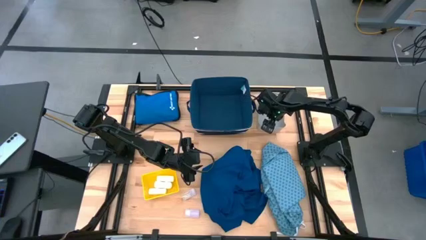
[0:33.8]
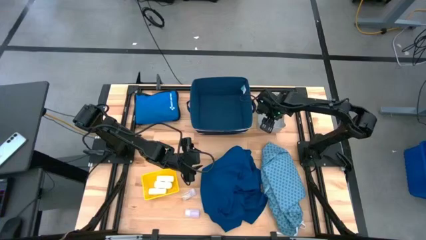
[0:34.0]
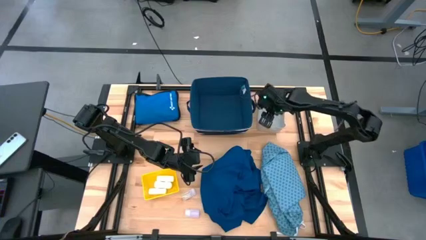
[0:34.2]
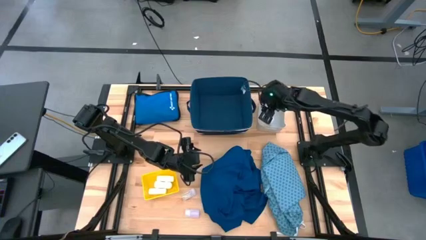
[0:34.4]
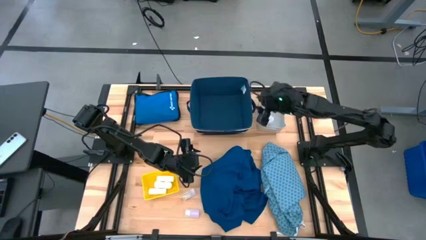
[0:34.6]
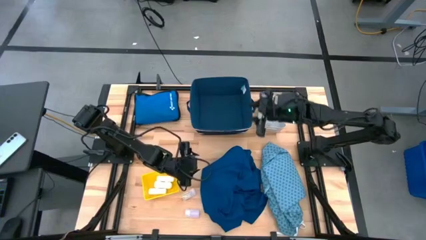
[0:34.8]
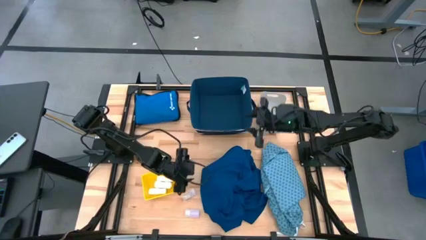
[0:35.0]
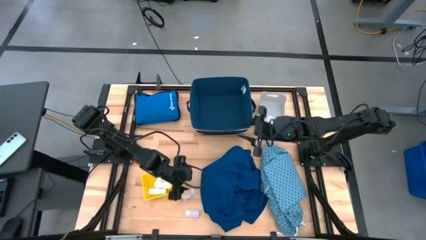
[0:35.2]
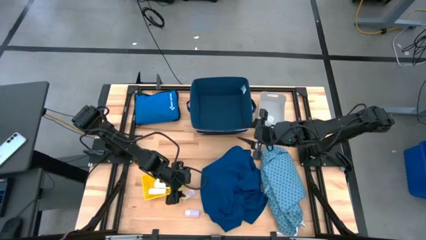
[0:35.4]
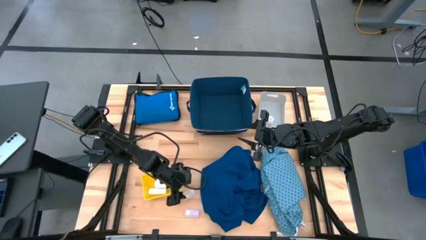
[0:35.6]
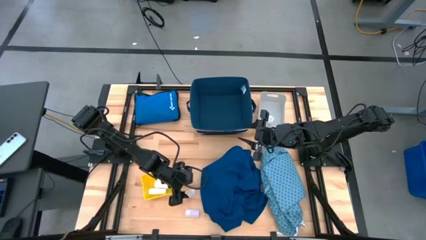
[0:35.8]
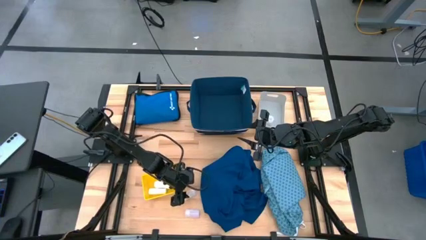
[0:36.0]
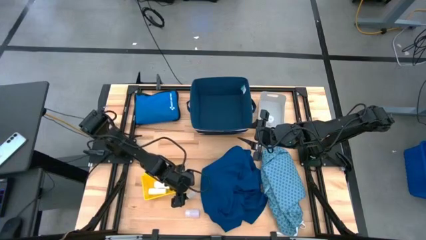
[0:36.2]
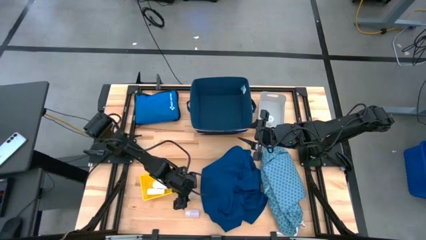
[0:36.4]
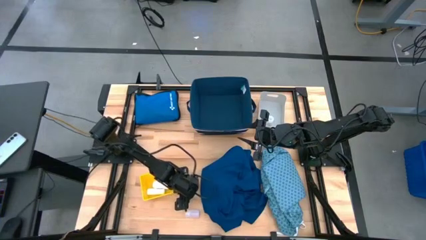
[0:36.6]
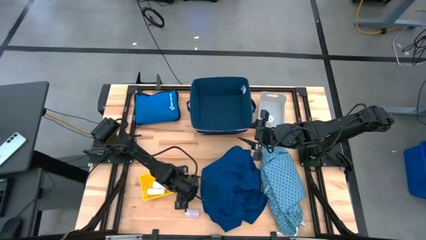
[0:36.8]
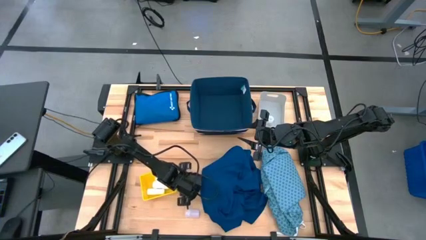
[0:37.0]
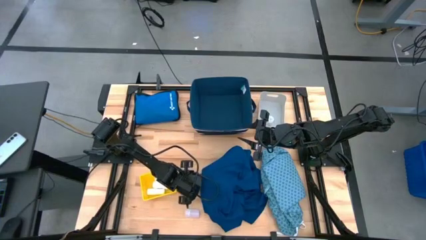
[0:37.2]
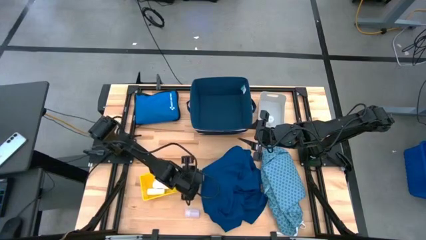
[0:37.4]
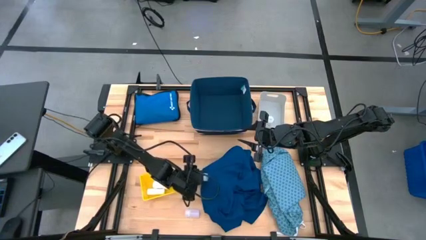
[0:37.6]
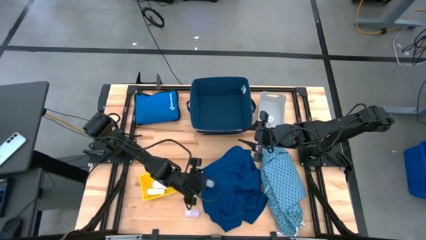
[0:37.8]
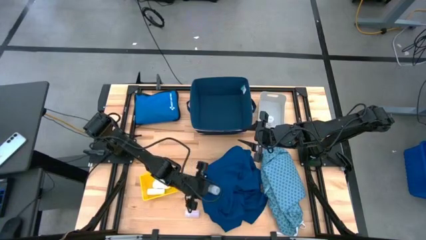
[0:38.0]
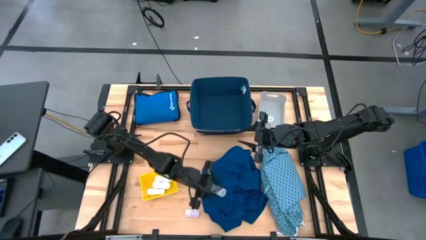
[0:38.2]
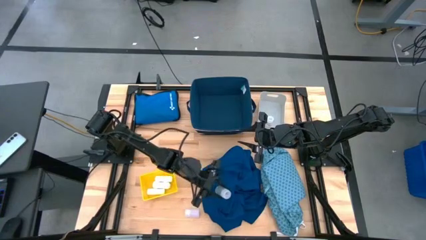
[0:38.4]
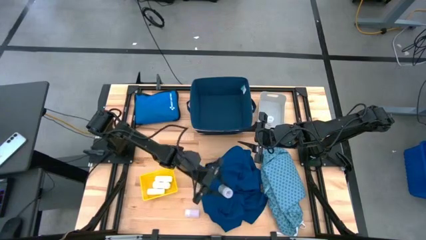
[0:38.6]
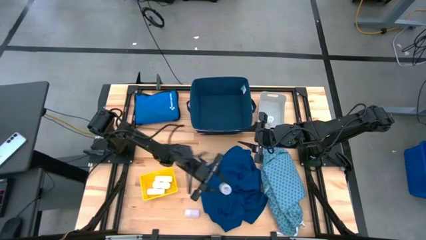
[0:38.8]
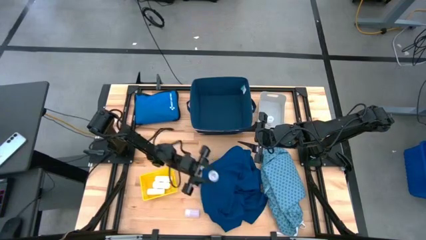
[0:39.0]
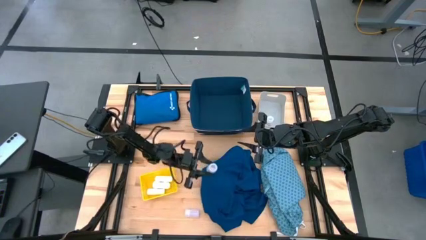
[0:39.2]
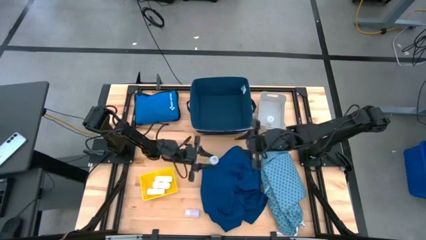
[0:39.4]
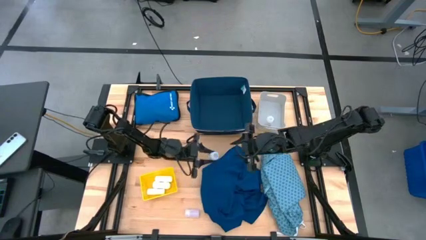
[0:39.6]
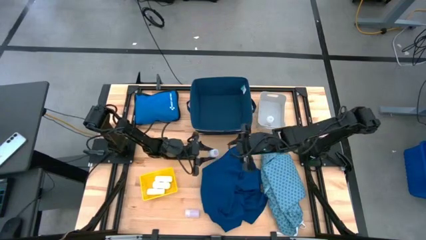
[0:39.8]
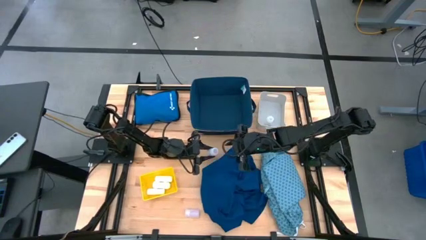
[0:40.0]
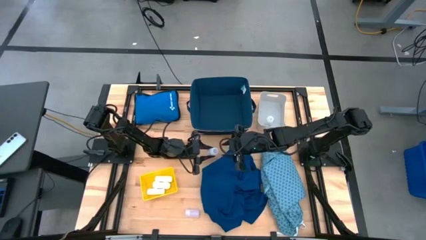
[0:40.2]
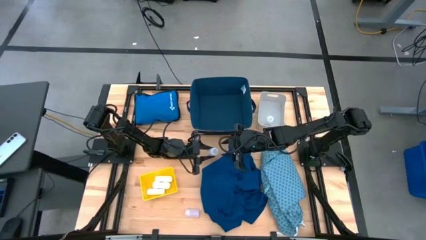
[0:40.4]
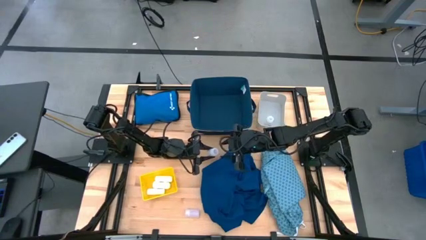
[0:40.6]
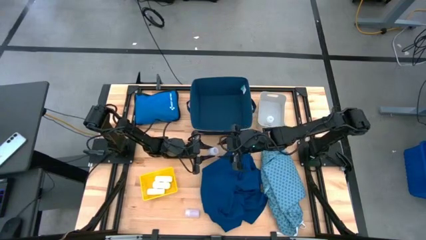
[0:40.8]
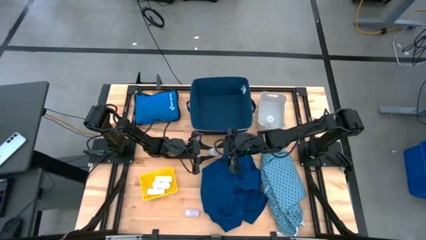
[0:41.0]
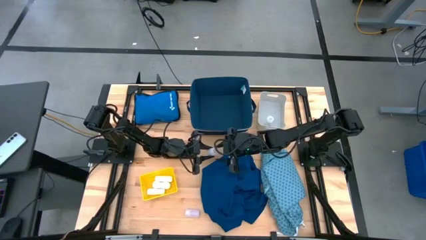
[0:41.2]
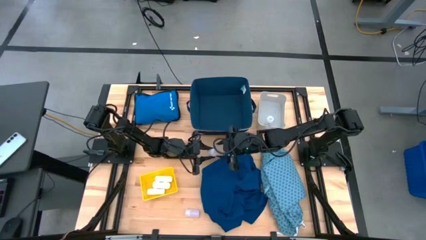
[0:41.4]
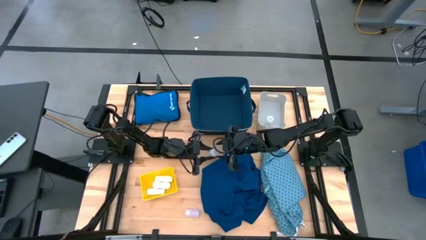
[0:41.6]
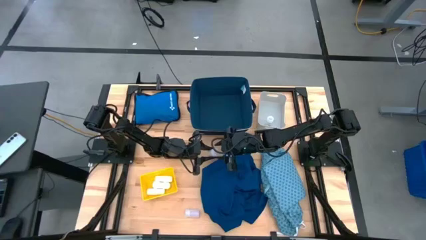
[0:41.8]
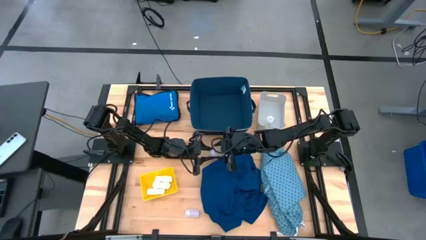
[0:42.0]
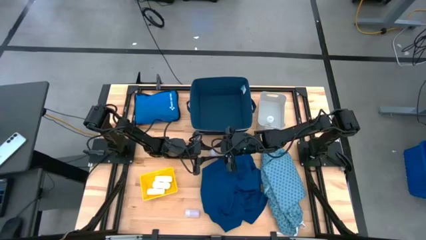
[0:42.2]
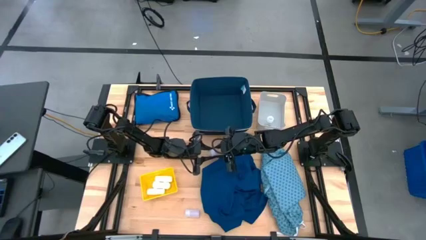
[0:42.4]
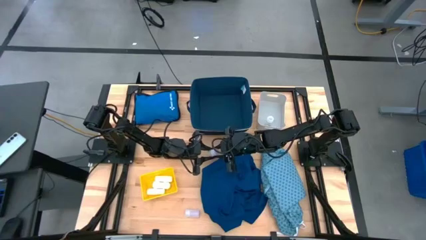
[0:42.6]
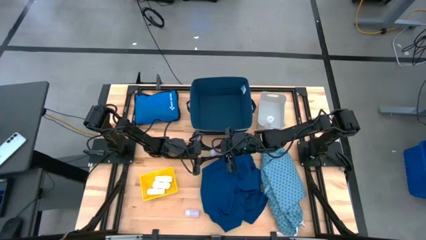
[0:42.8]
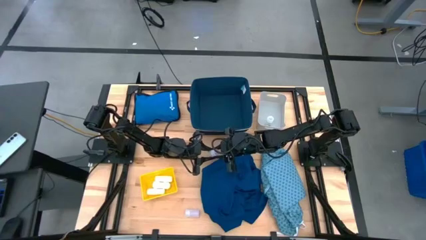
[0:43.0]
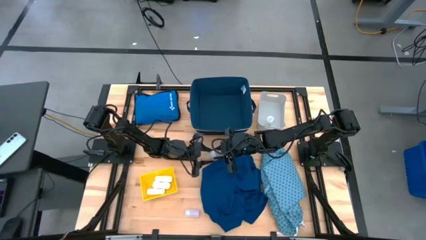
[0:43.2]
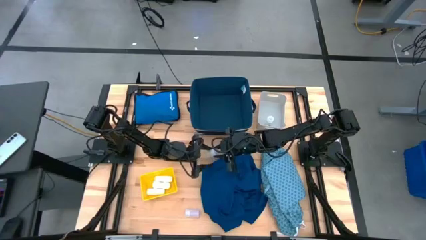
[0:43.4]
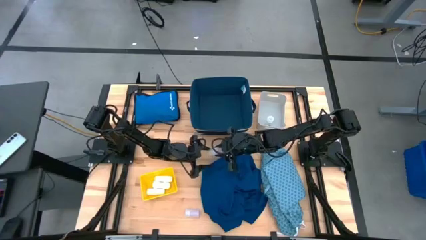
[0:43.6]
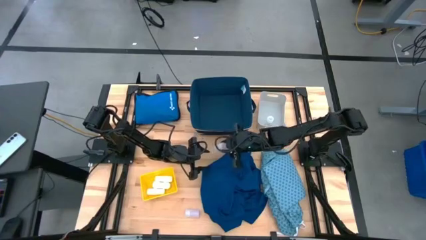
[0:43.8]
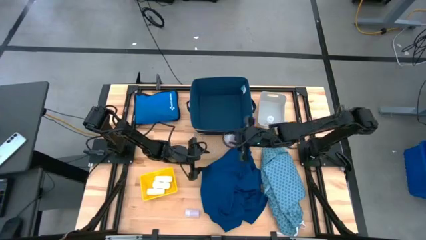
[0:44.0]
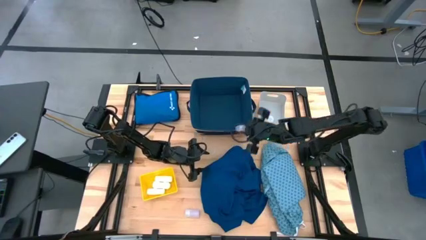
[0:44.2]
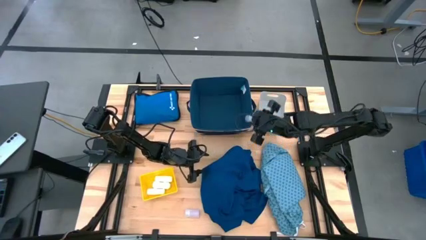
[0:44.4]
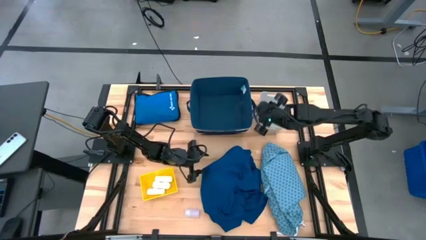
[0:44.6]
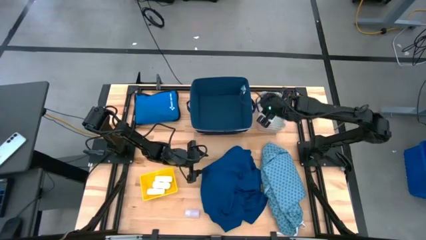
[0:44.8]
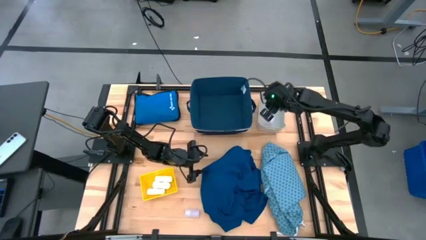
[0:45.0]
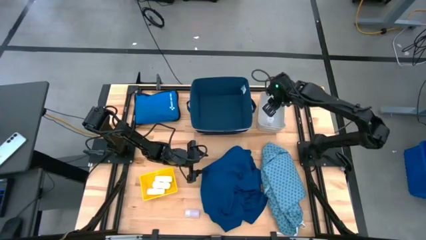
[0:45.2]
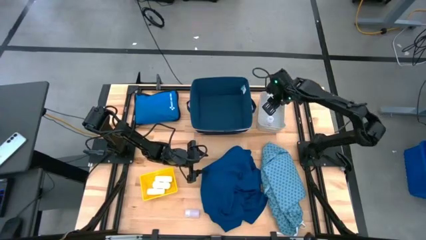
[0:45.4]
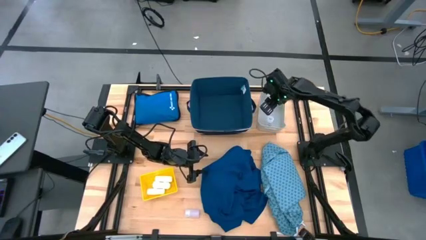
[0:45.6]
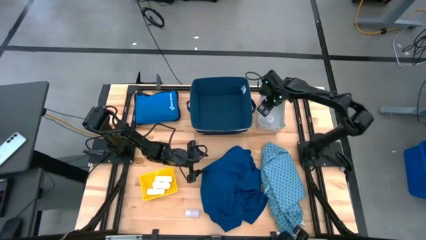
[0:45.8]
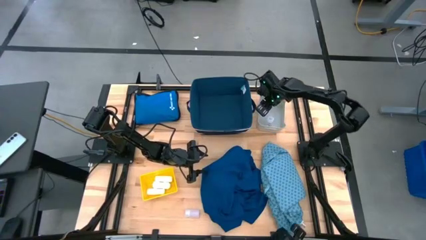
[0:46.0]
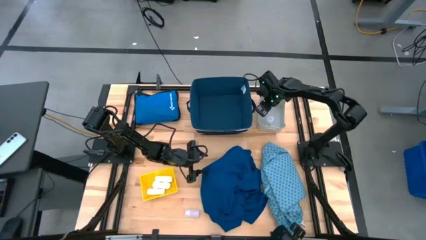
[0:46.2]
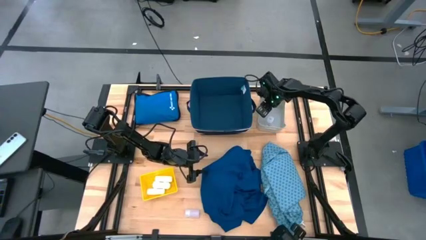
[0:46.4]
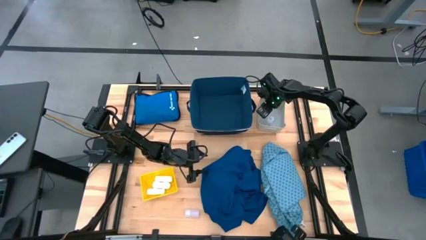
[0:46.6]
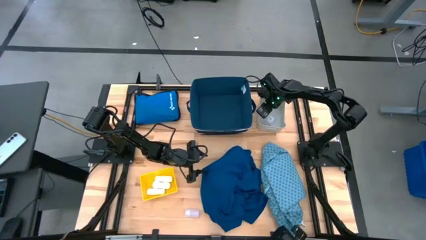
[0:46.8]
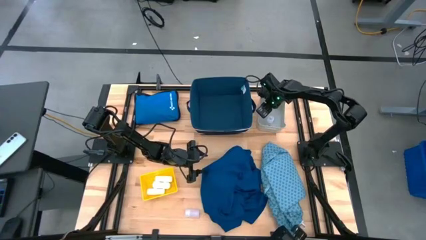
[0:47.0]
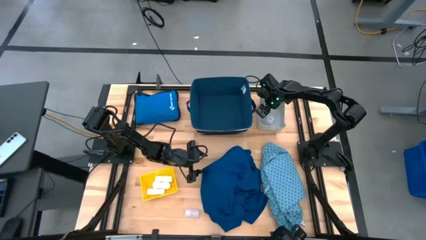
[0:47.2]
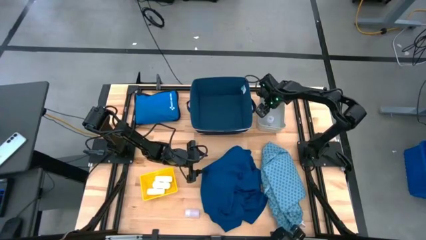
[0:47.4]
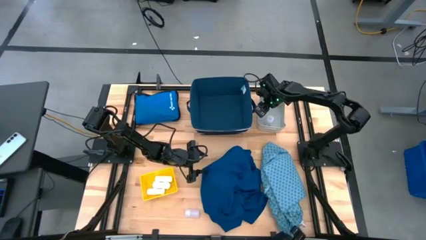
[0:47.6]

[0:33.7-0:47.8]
Task: Pick & Place Medicine items
Put the top transparent pill bottle into the white bin
